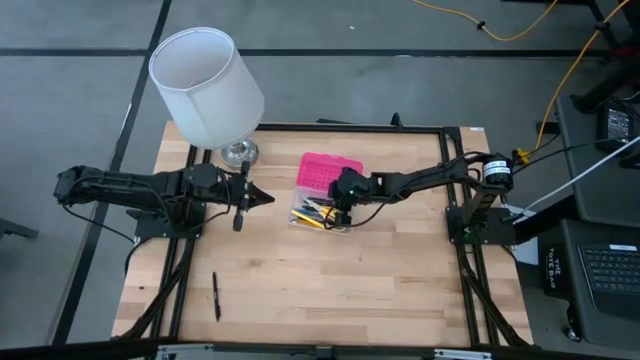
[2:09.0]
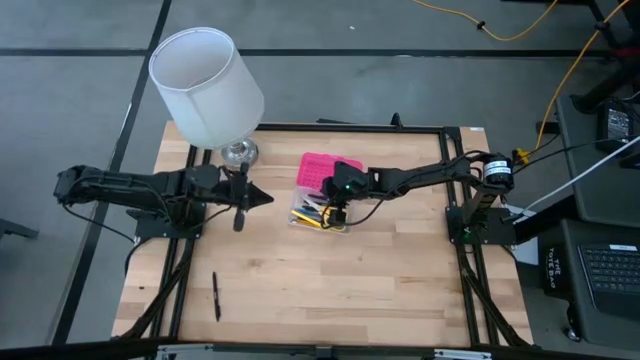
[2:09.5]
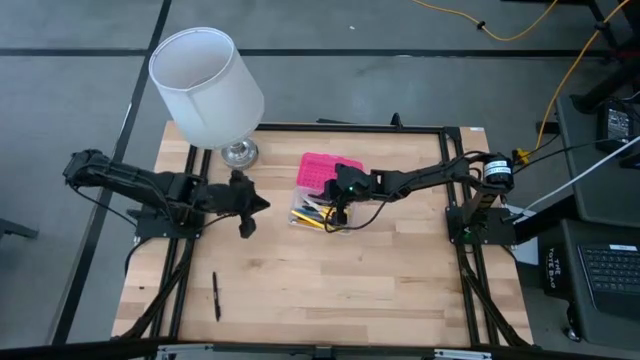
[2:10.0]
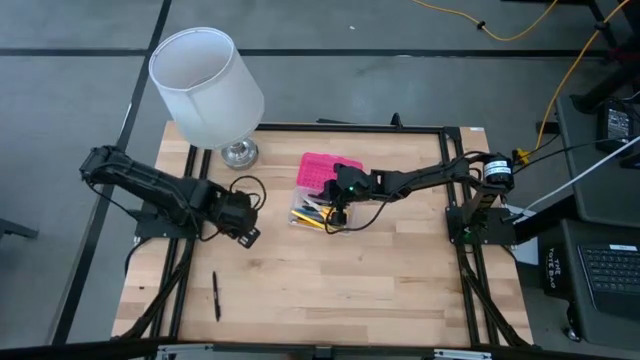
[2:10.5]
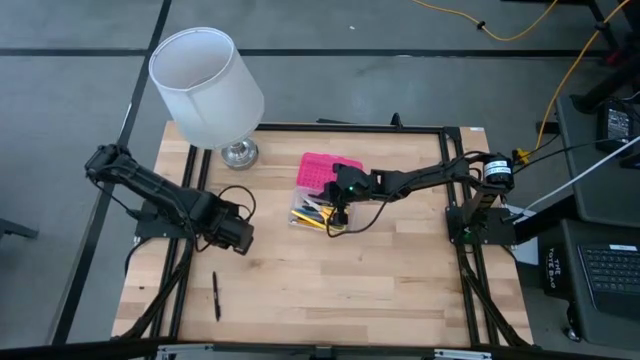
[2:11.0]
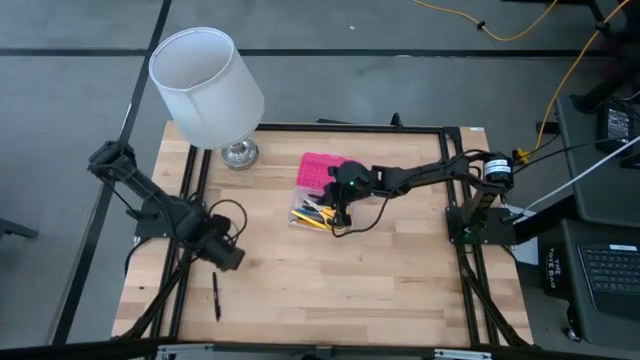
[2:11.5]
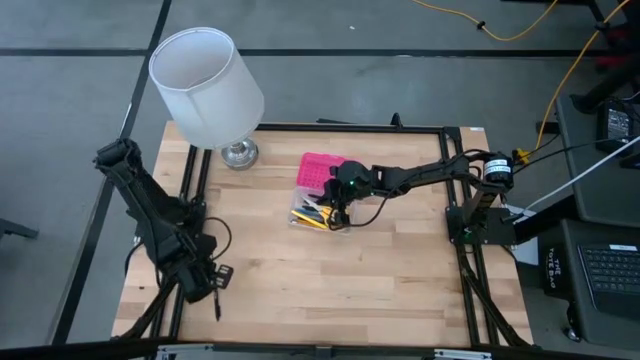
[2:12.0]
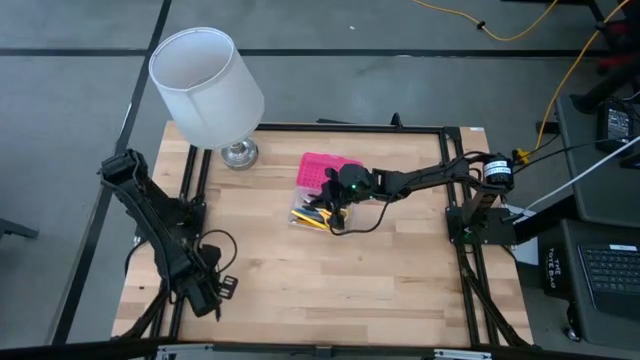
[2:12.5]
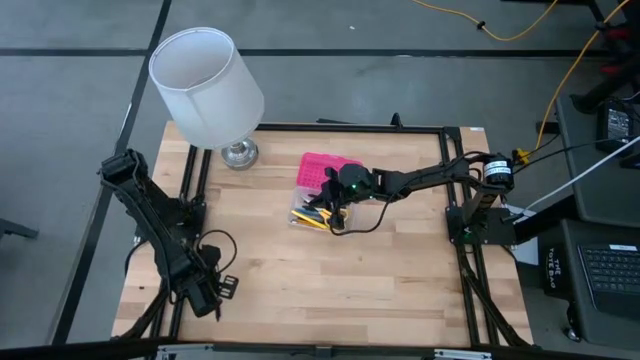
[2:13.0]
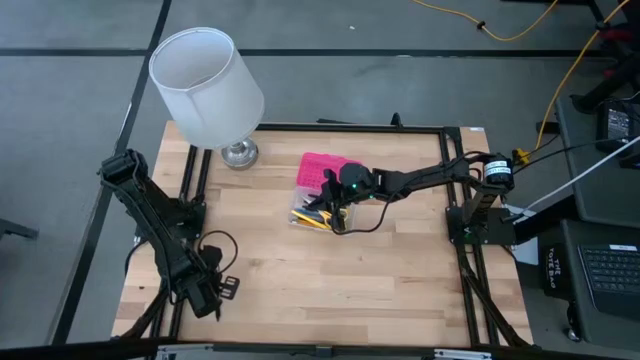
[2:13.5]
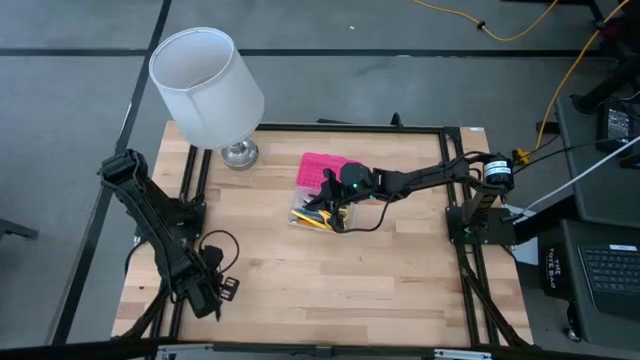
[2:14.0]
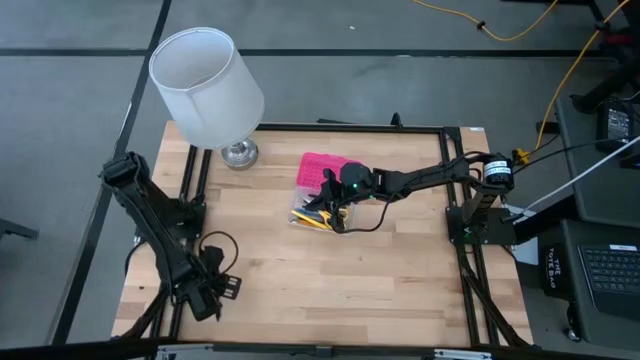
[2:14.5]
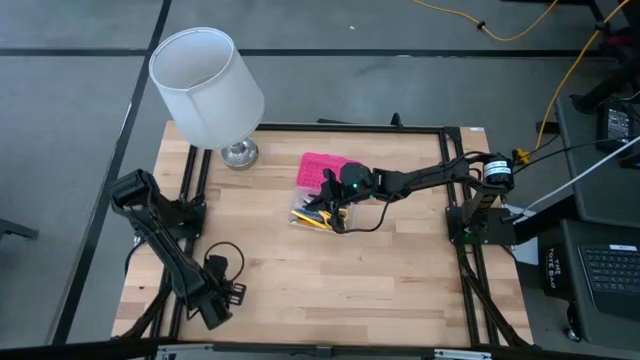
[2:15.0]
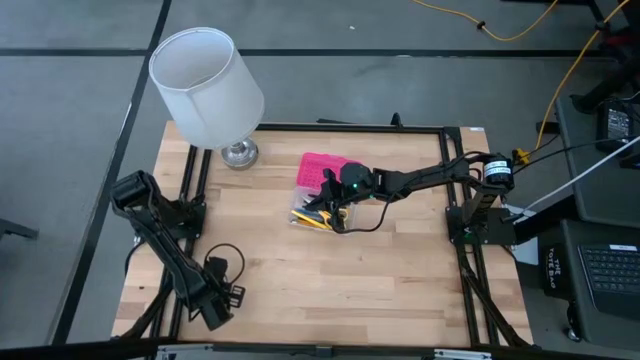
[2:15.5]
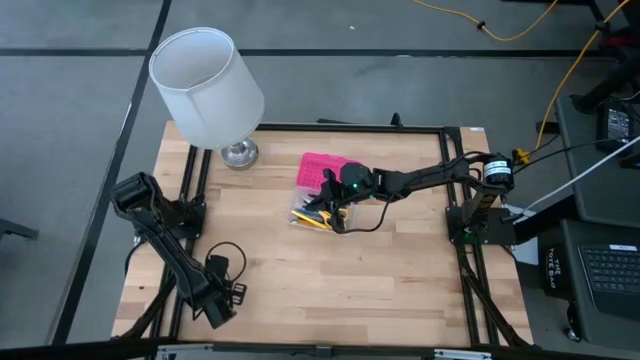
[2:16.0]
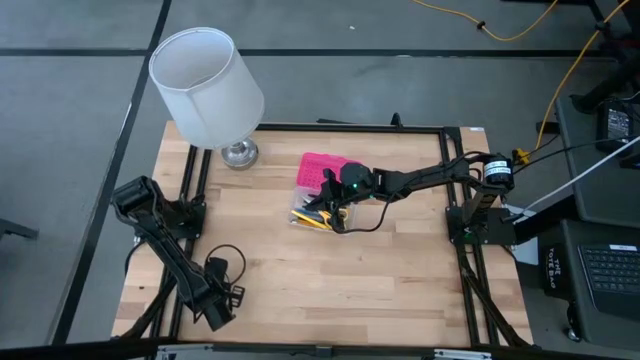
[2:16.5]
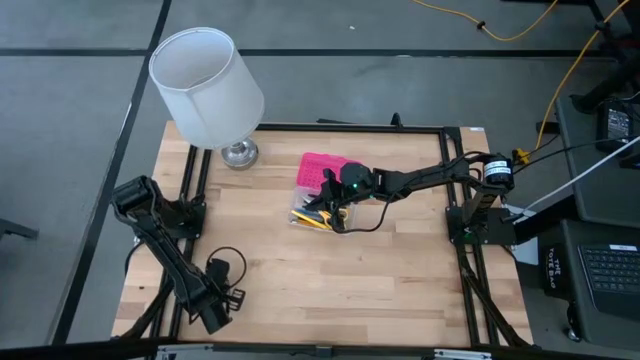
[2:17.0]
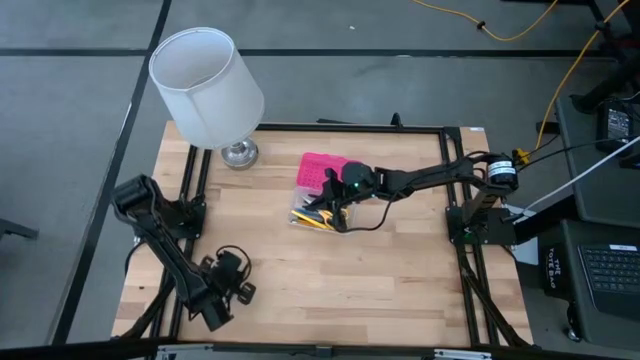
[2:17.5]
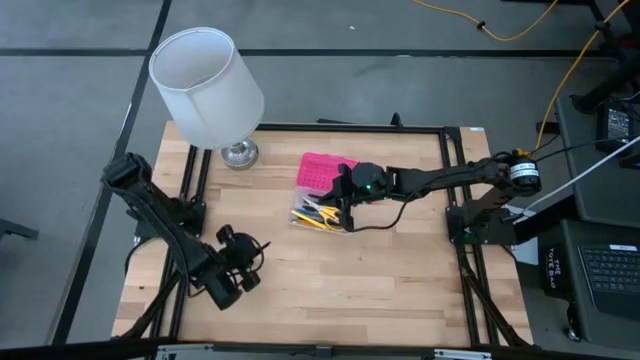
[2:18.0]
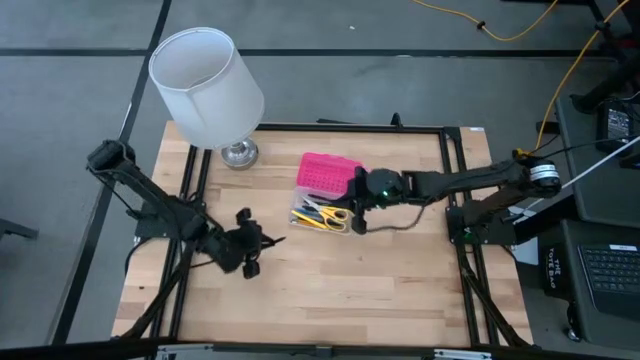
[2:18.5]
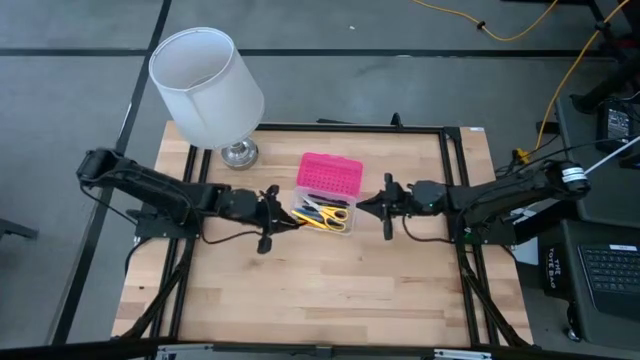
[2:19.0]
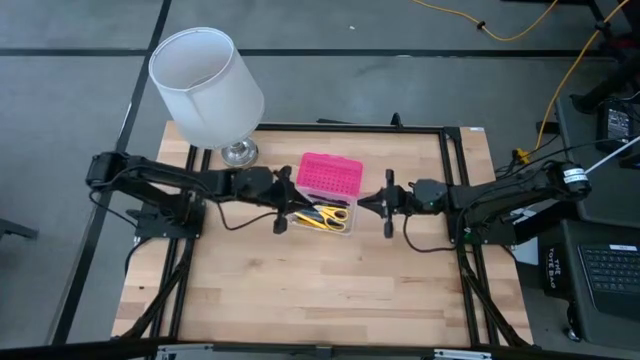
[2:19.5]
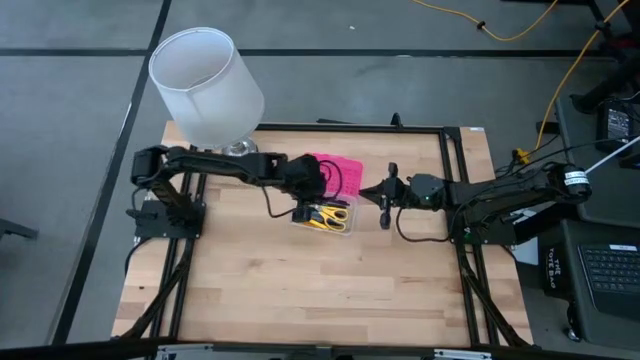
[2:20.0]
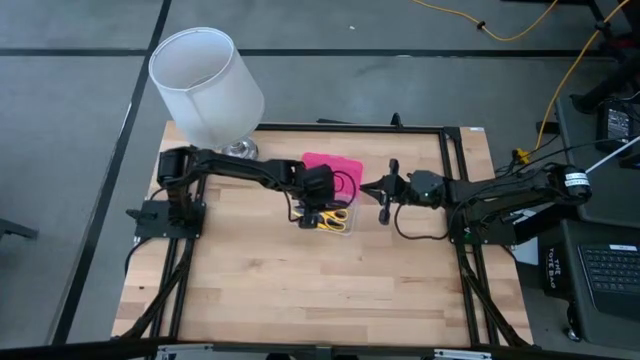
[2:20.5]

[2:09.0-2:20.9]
Task: Pick & place school supplies into a supply box
Put the black pen into the transparent supply box

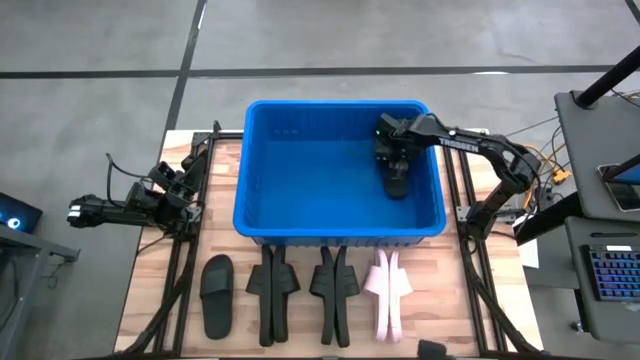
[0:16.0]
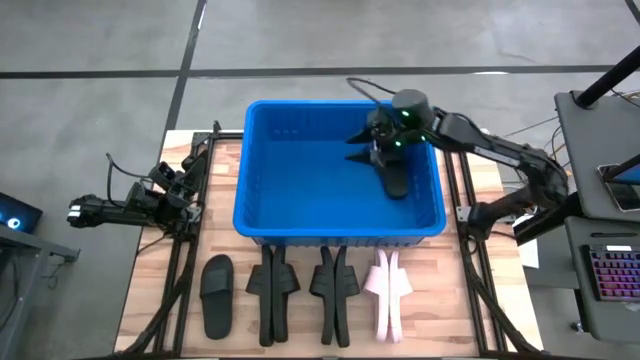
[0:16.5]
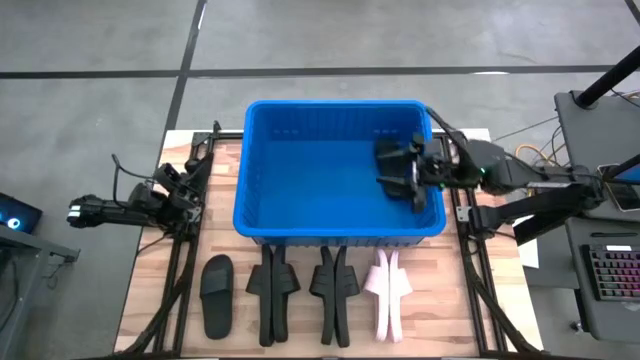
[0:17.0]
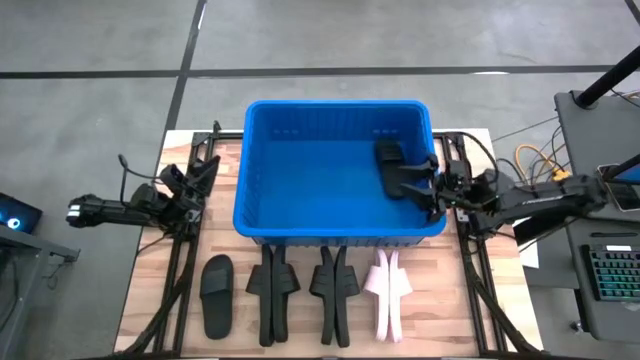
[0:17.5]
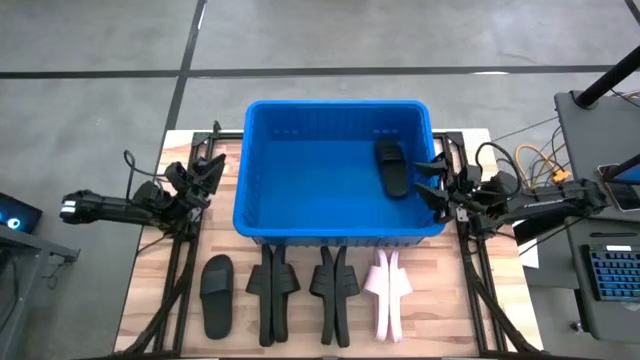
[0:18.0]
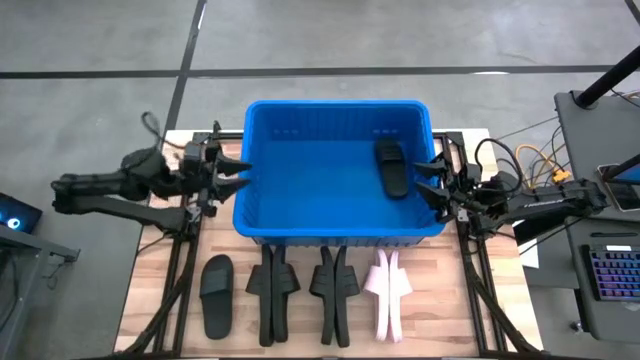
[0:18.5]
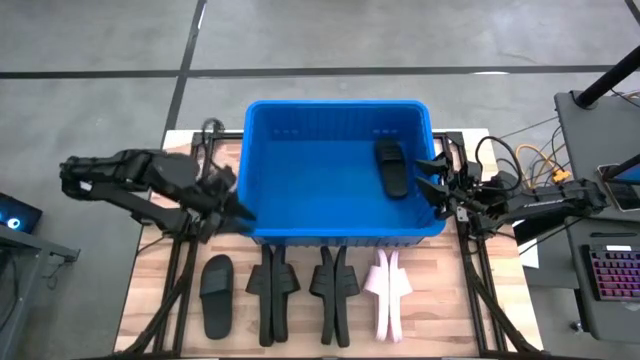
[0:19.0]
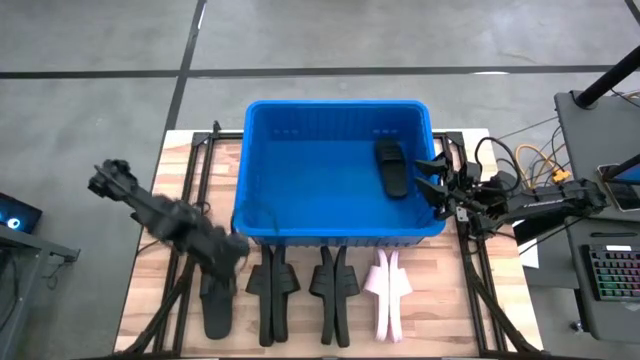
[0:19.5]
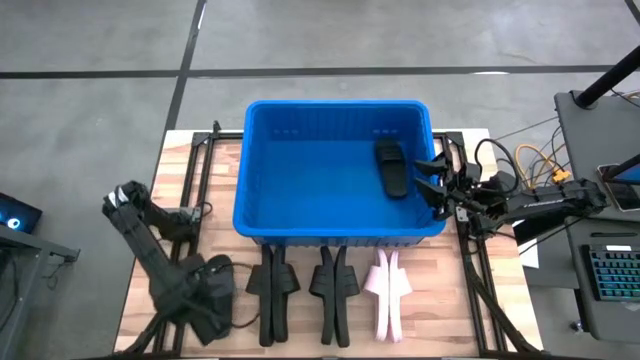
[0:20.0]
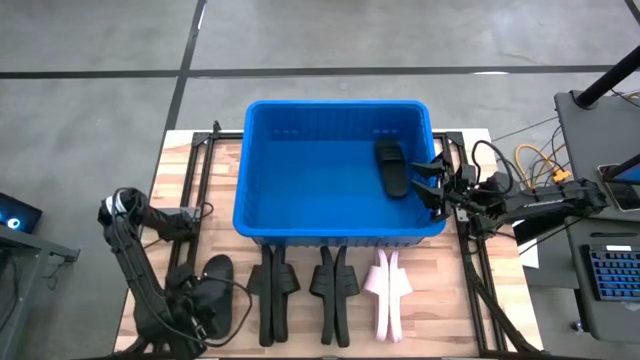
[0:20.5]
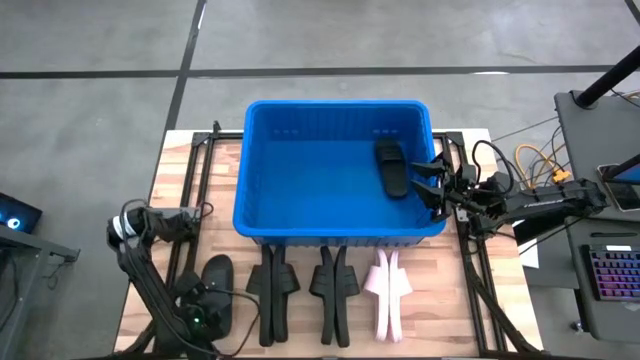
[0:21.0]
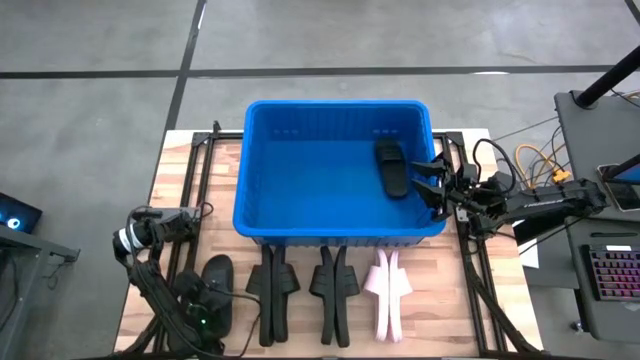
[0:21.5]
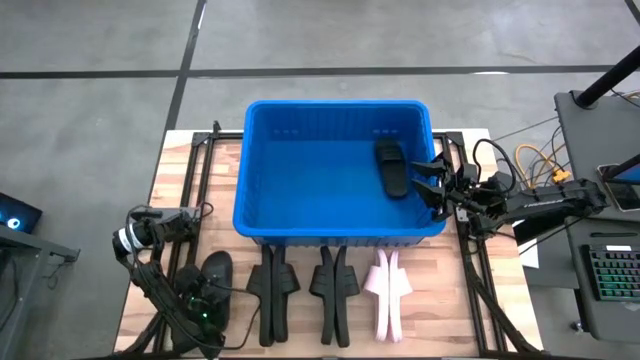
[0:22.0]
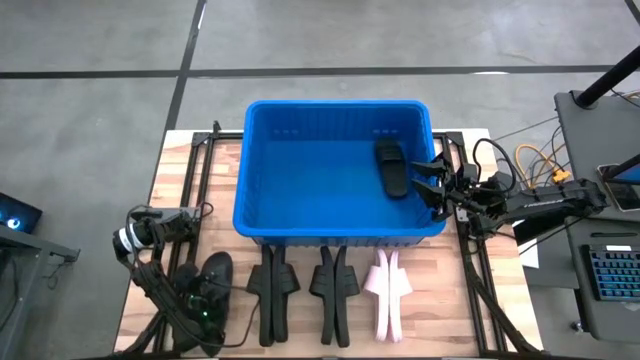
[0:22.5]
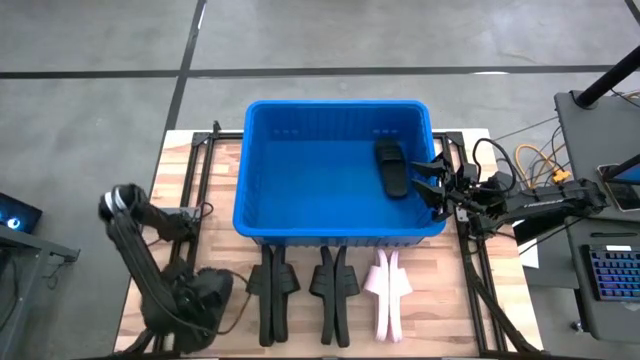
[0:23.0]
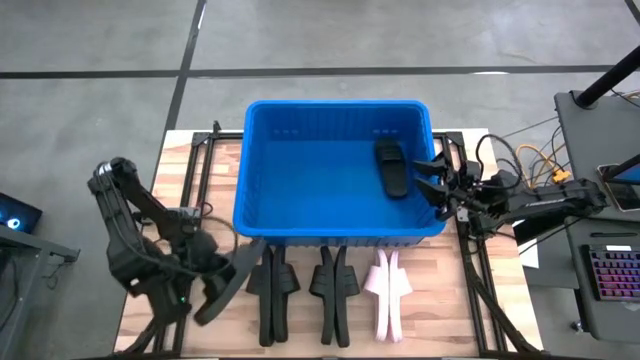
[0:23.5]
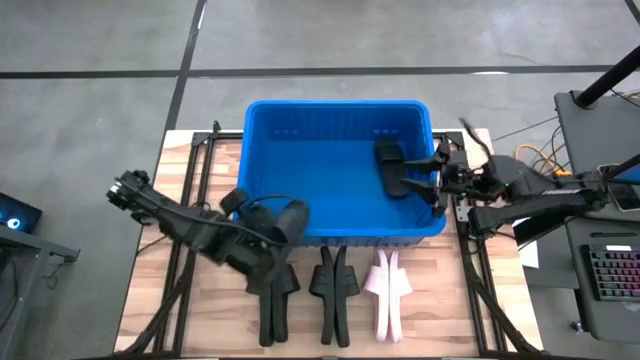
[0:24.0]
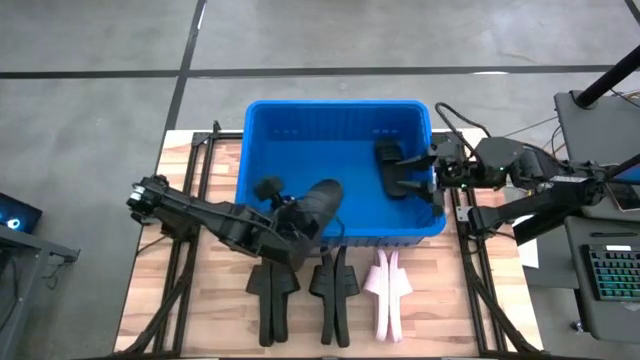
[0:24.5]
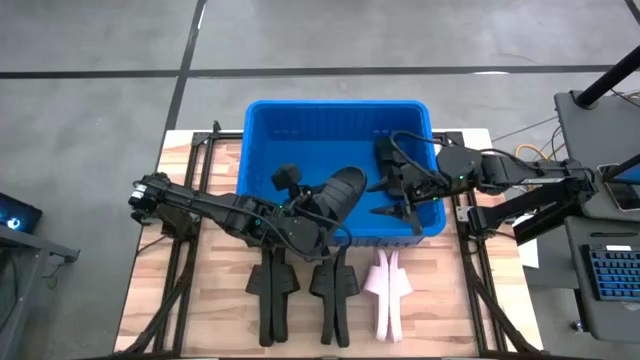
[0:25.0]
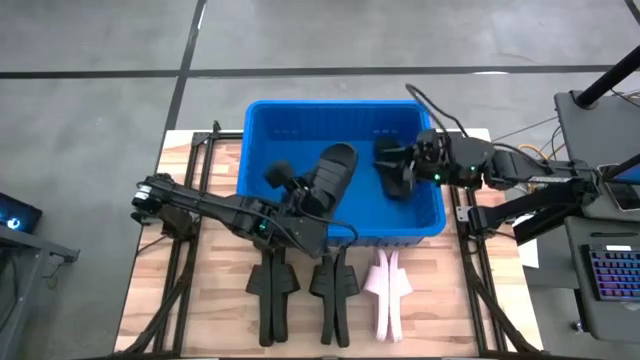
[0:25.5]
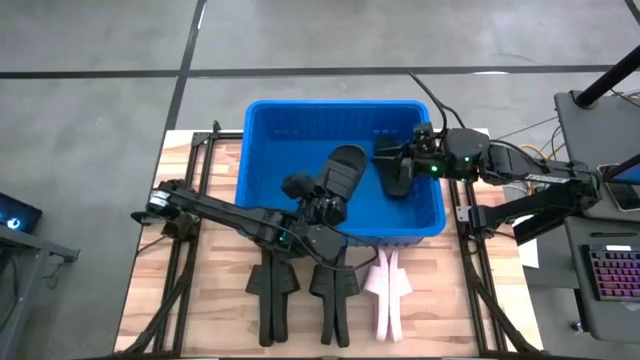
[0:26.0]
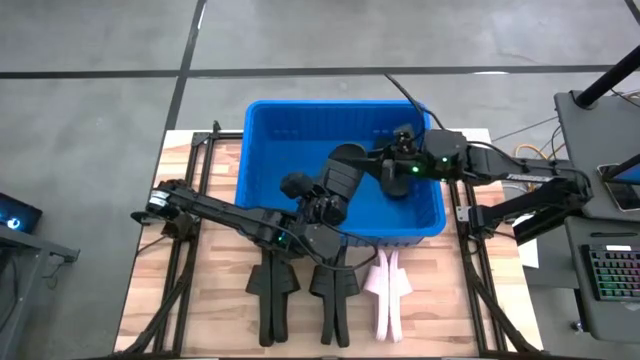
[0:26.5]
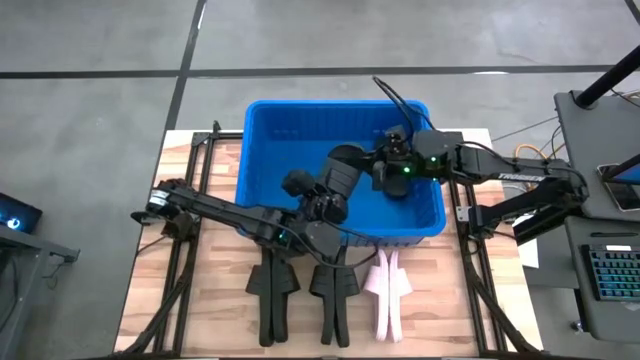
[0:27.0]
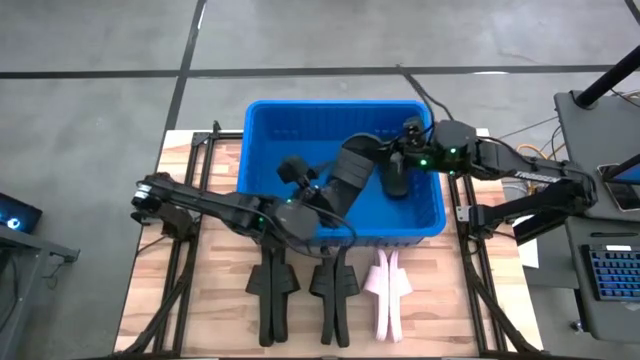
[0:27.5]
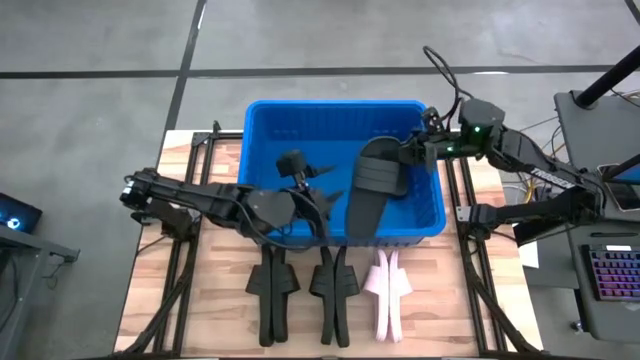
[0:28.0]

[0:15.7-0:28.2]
Task: Pick and place slides into bin
Put the black slide into the blue bin
